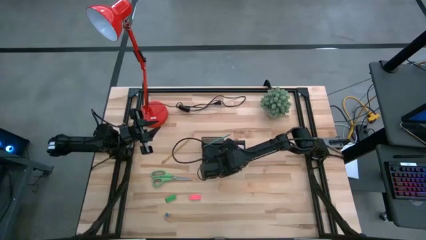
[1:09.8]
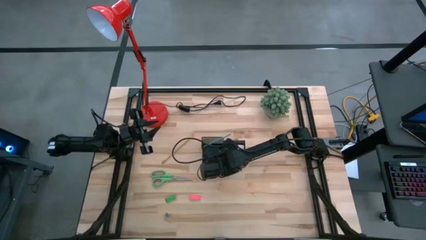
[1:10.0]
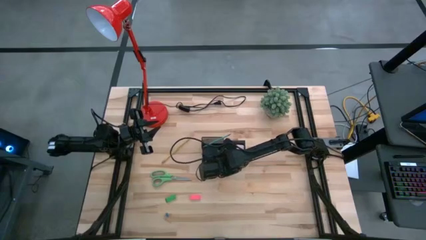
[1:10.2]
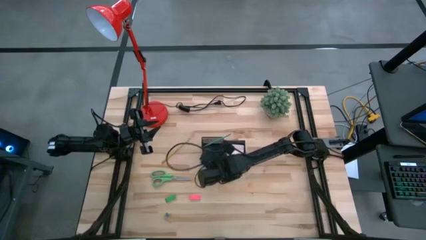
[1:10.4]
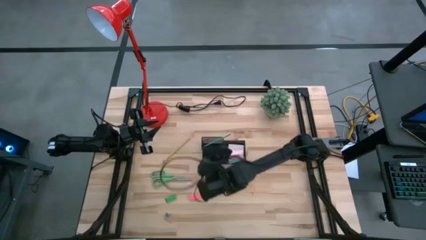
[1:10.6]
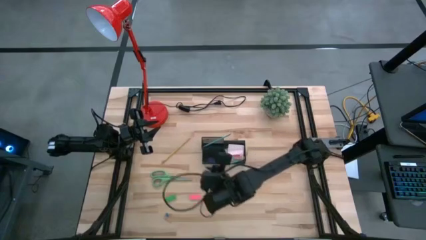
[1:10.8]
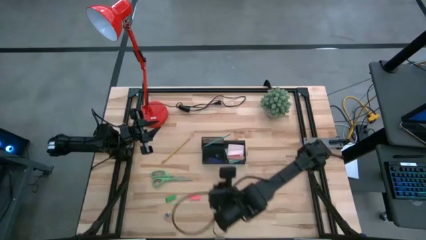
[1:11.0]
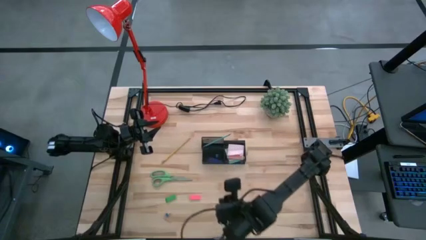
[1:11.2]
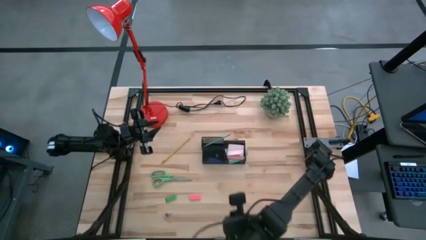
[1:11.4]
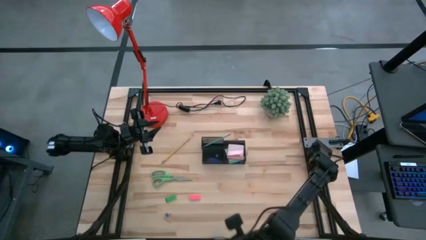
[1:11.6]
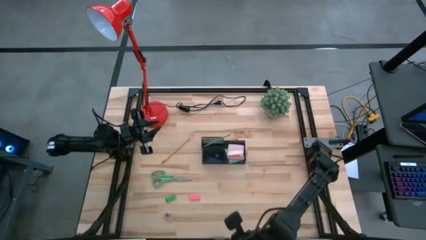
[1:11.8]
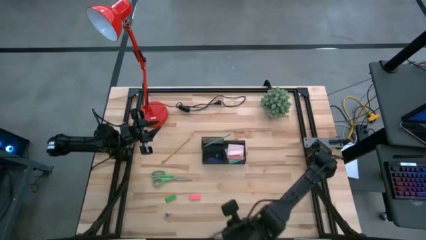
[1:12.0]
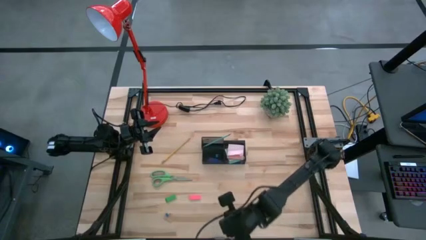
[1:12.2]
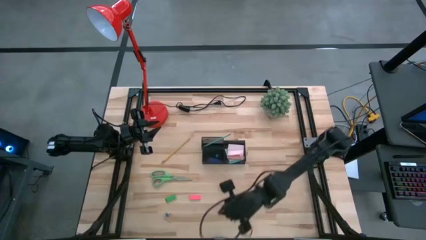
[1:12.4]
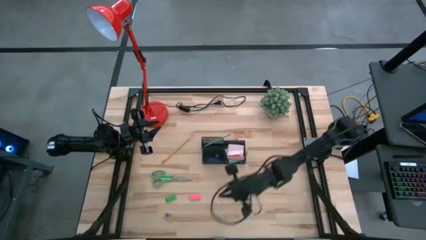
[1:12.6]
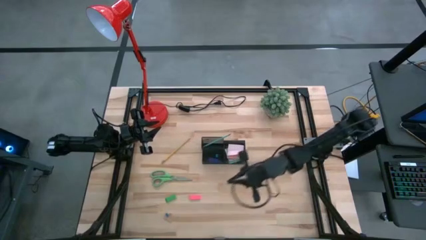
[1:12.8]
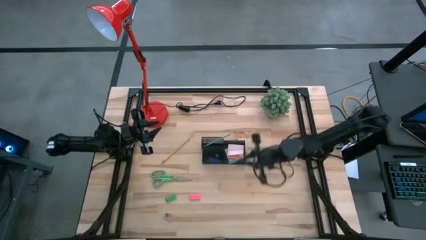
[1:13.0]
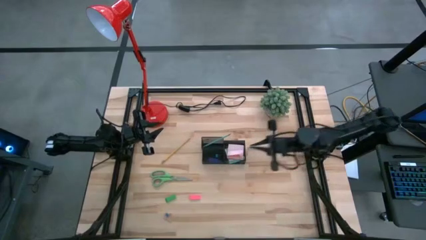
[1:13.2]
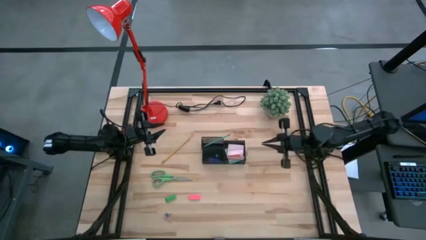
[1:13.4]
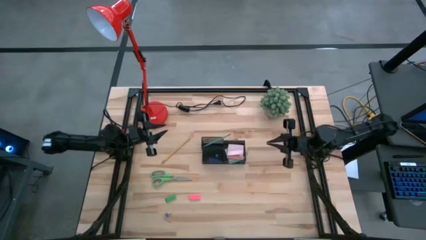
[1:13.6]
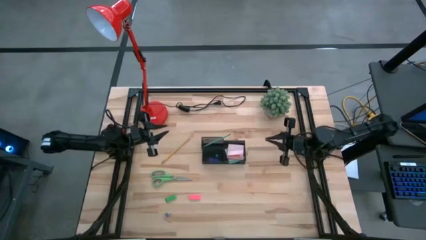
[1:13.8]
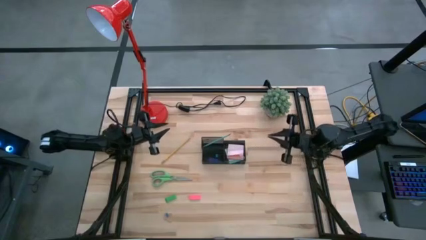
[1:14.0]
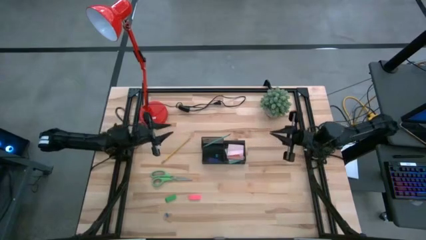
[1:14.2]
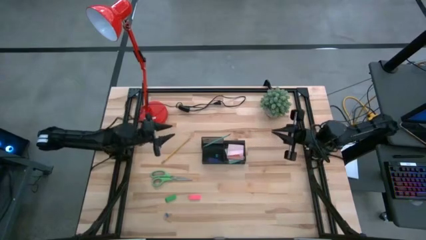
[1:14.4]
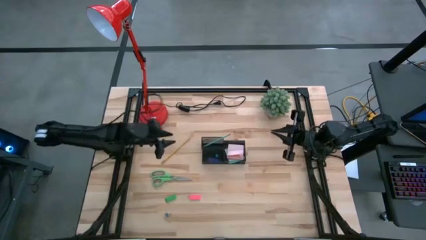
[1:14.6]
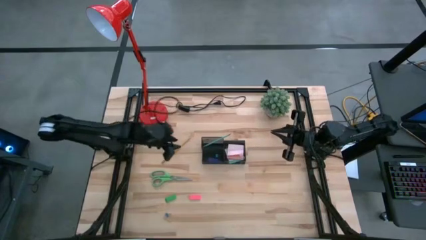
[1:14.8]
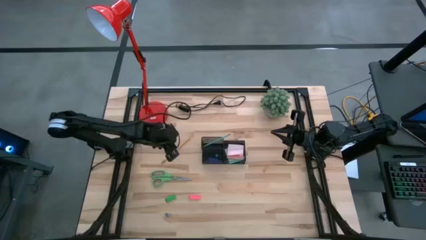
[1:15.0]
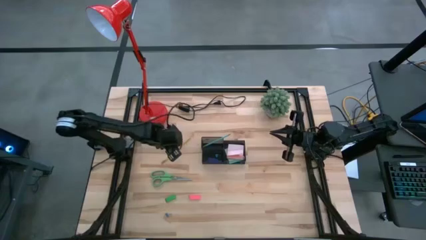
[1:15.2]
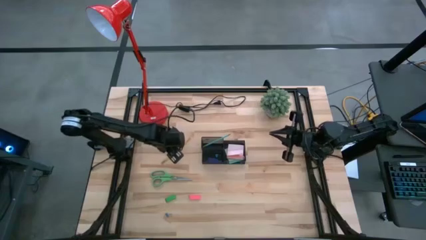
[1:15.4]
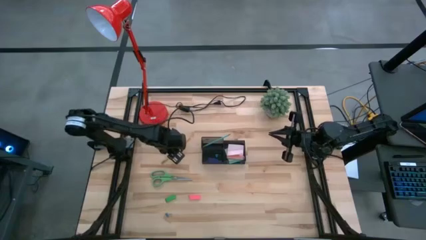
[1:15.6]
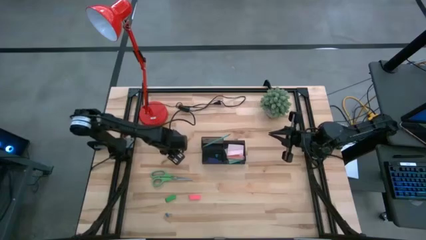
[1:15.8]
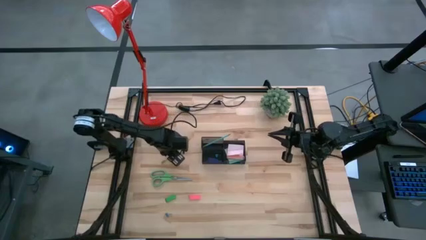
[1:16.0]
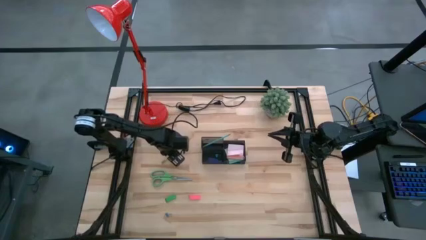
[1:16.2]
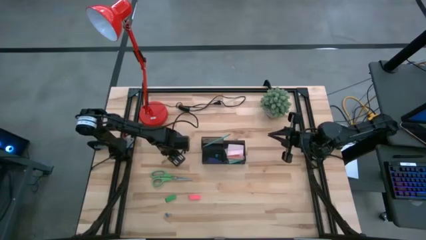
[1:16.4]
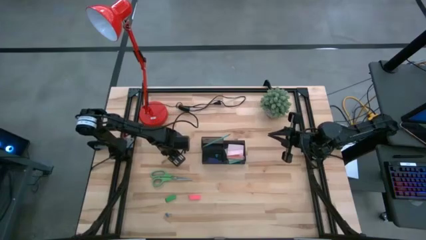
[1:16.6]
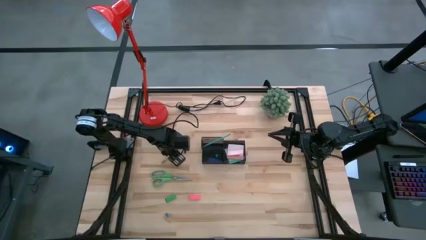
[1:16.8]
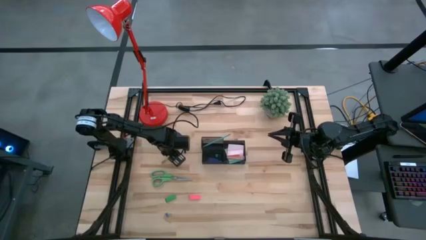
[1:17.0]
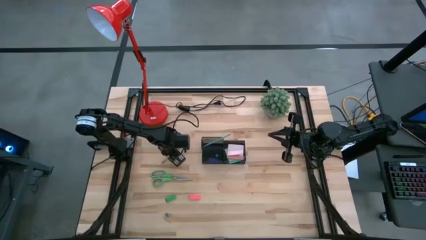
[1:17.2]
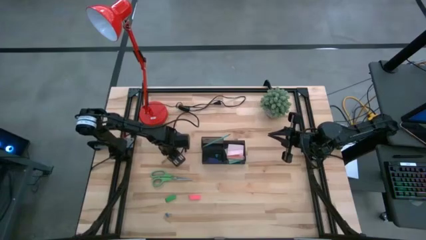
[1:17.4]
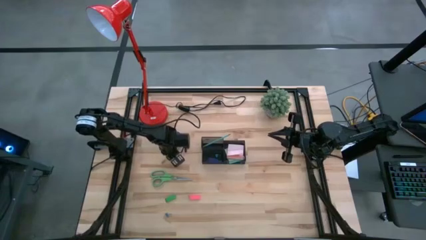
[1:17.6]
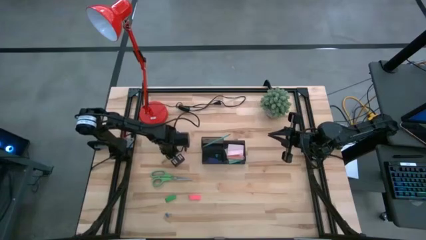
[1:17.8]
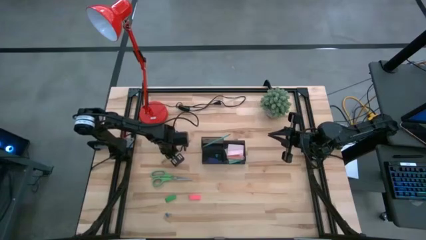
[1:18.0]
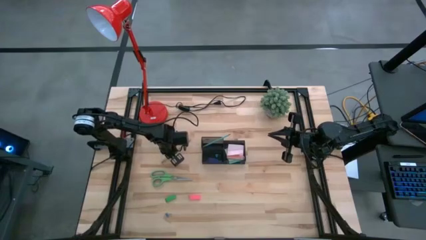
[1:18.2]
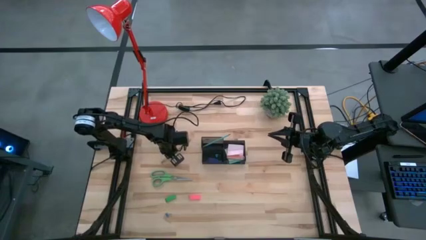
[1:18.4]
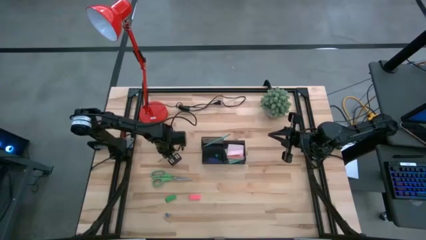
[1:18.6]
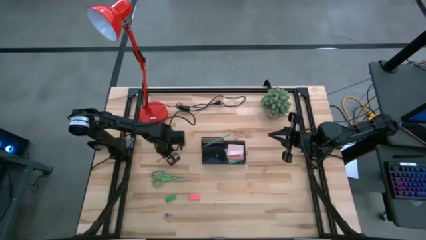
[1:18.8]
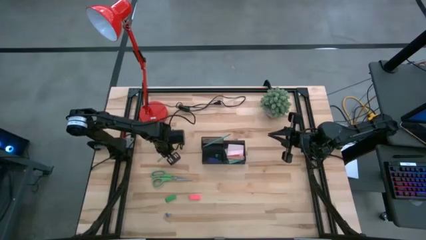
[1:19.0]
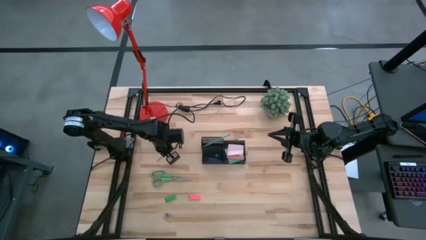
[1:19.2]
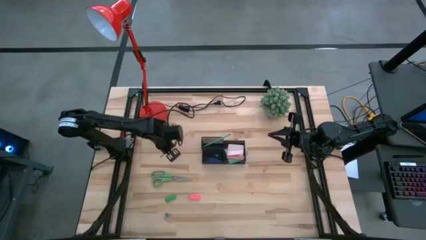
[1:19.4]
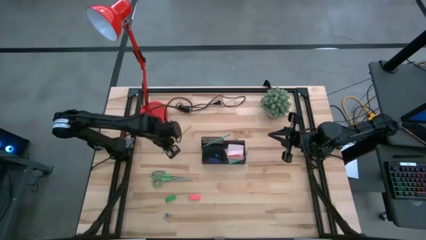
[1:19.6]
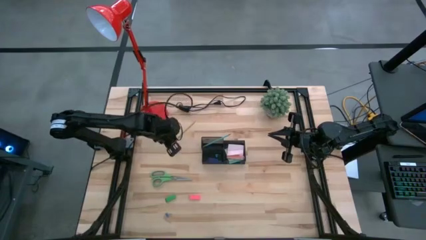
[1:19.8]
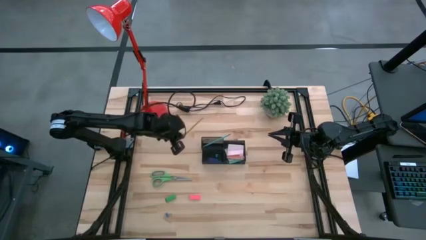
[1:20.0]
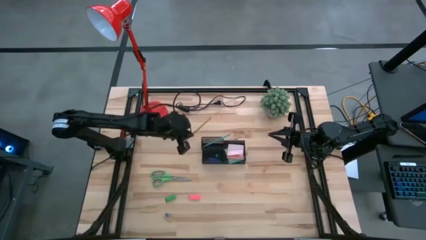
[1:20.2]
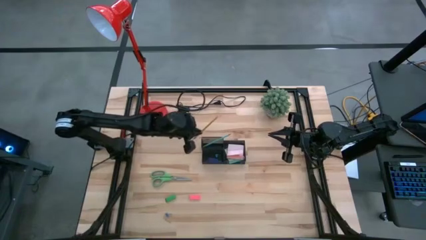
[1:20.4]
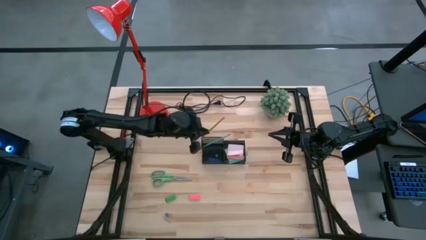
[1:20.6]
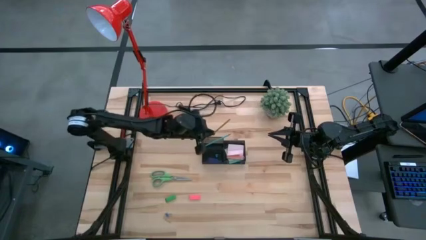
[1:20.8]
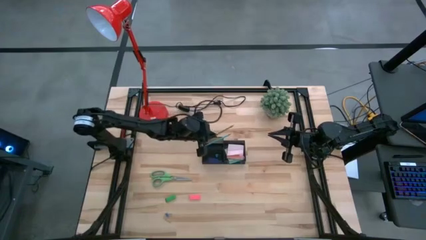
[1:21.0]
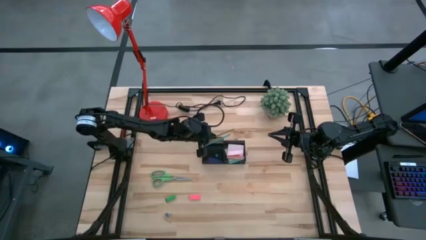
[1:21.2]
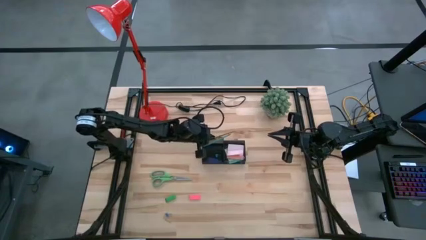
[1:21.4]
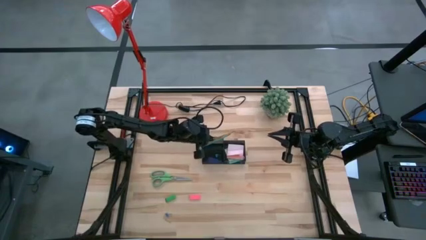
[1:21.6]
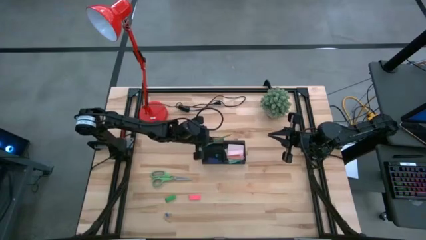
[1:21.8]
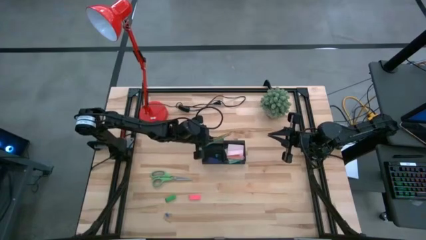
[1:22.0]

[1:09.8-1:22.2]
Task: Pick and place office supplies into organizer
Put the yellow pencil into the black desk organizer
